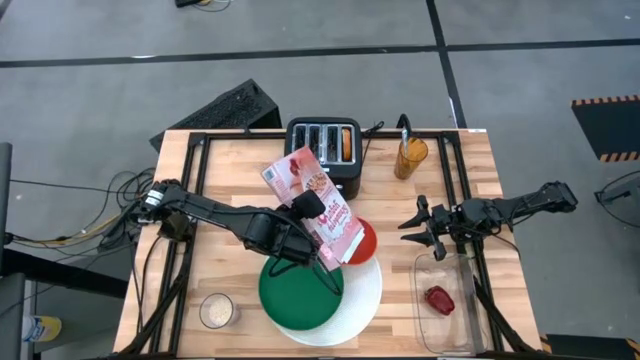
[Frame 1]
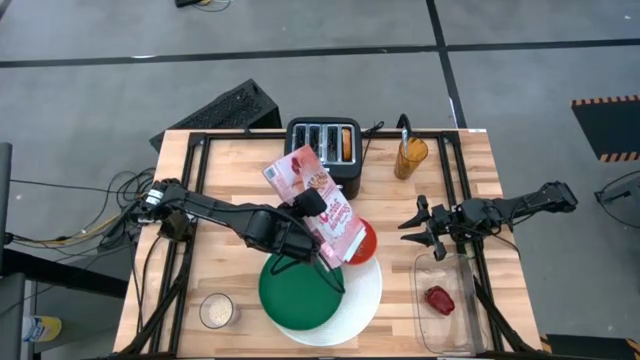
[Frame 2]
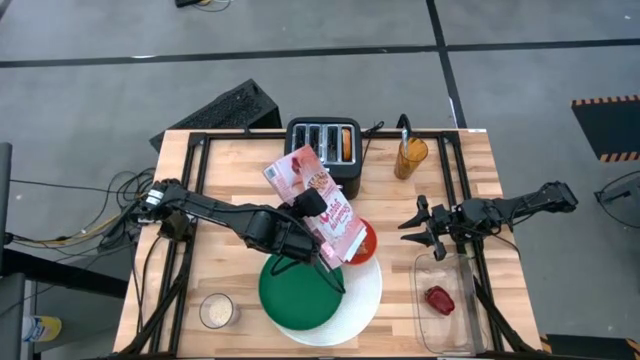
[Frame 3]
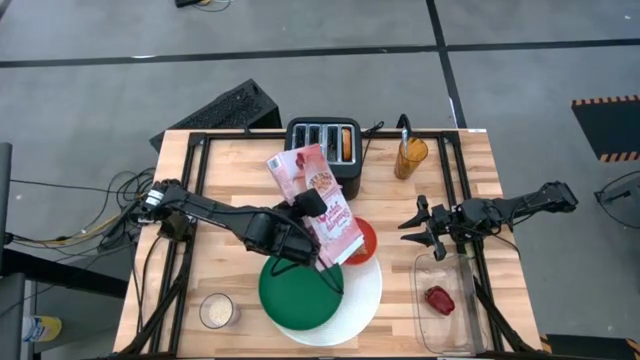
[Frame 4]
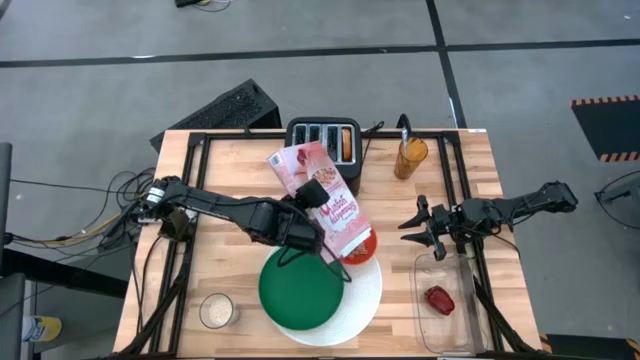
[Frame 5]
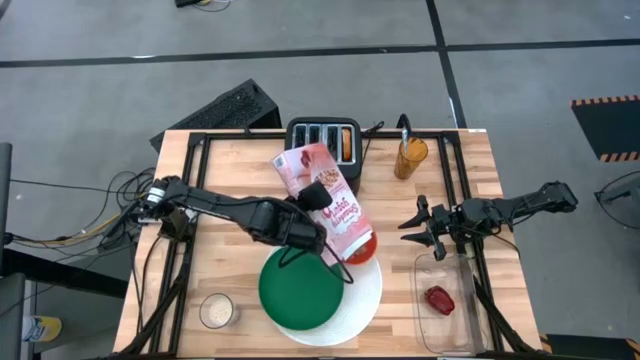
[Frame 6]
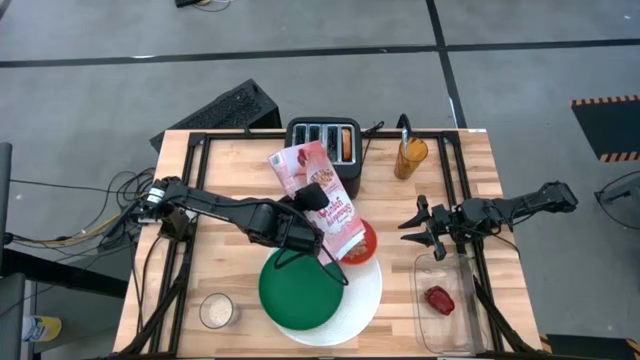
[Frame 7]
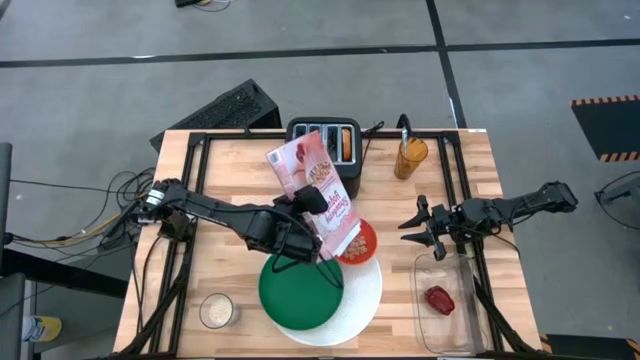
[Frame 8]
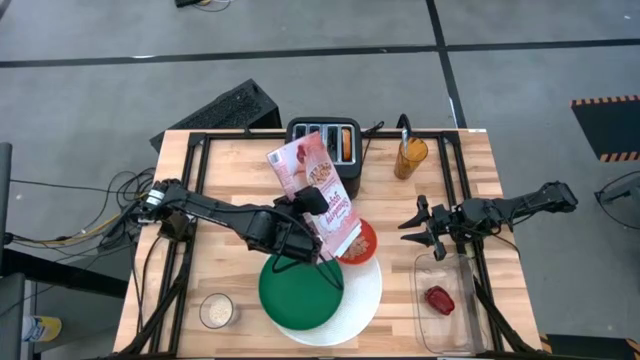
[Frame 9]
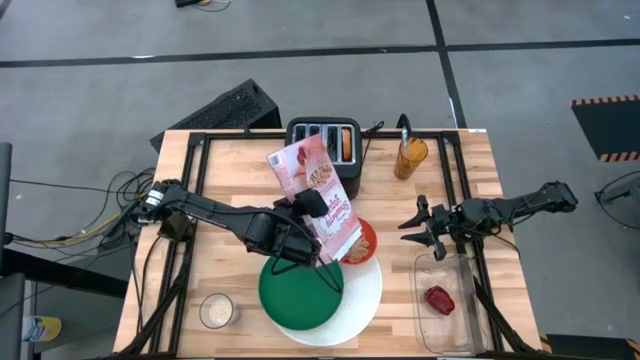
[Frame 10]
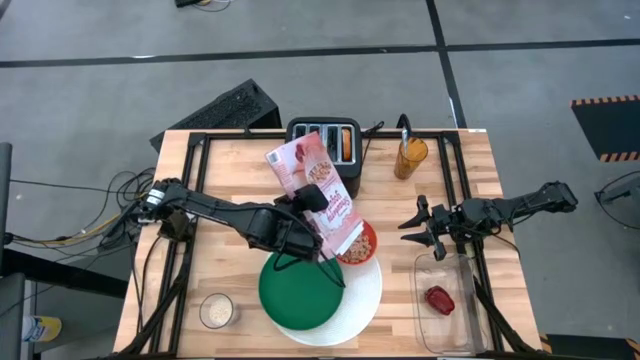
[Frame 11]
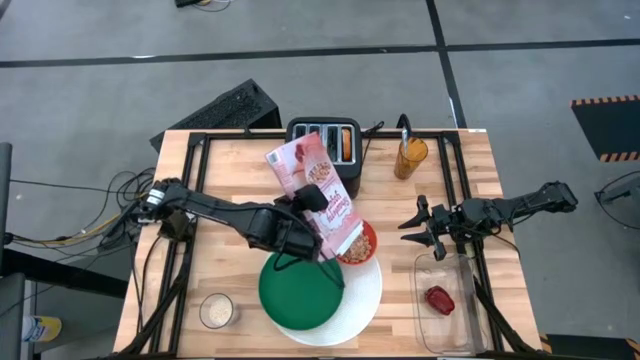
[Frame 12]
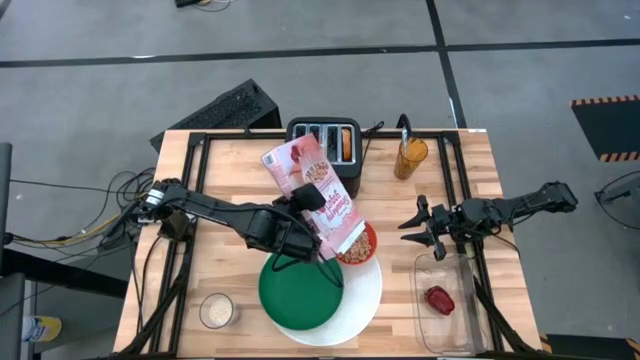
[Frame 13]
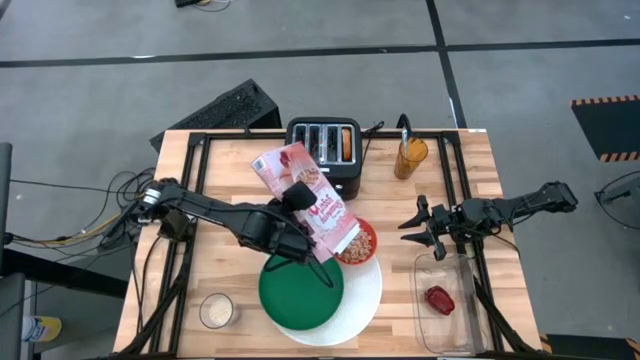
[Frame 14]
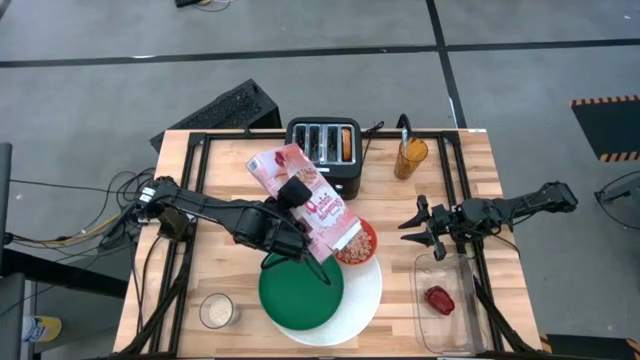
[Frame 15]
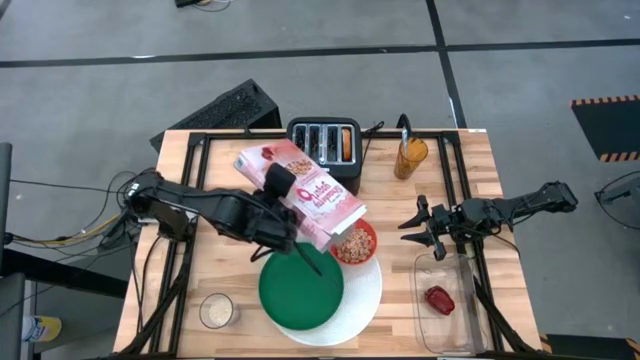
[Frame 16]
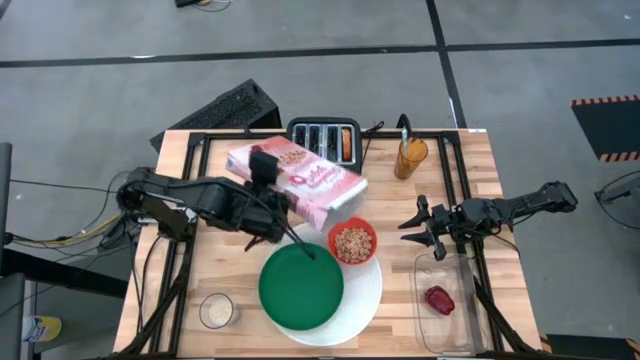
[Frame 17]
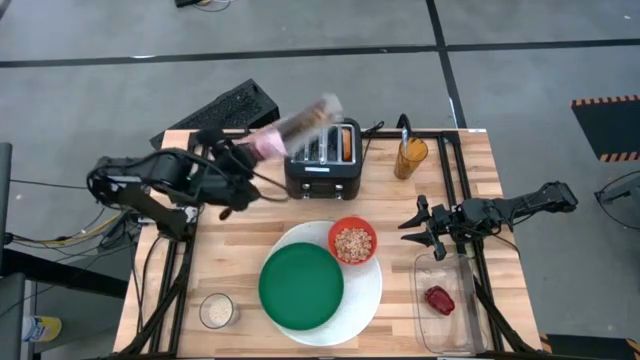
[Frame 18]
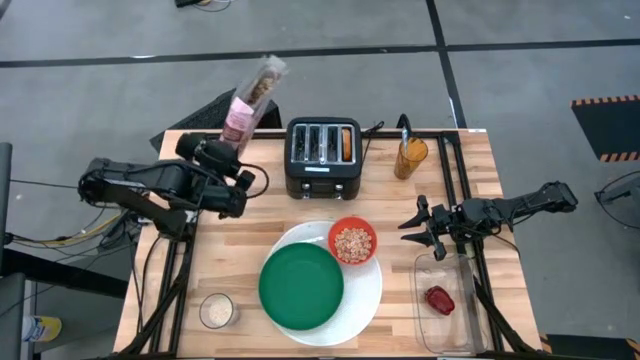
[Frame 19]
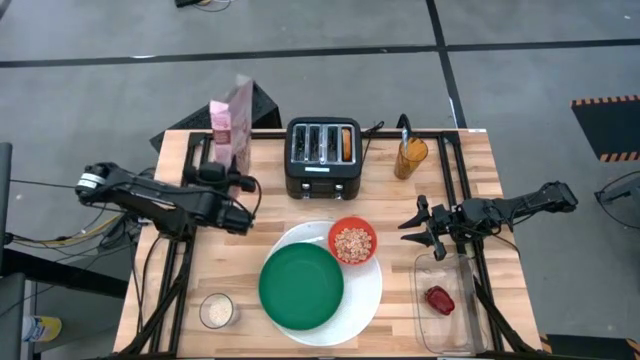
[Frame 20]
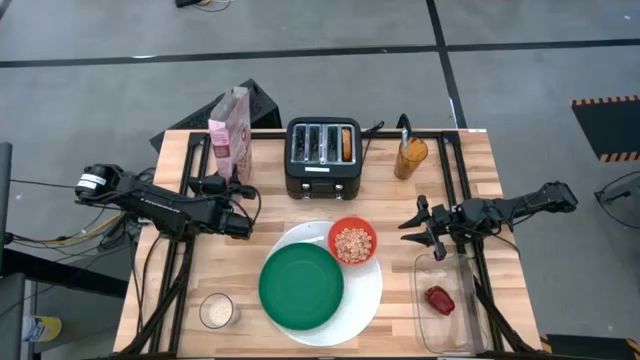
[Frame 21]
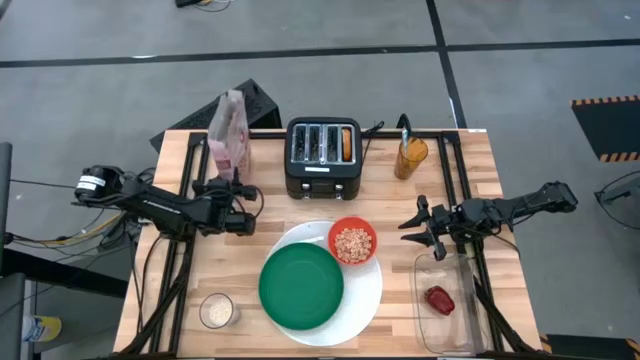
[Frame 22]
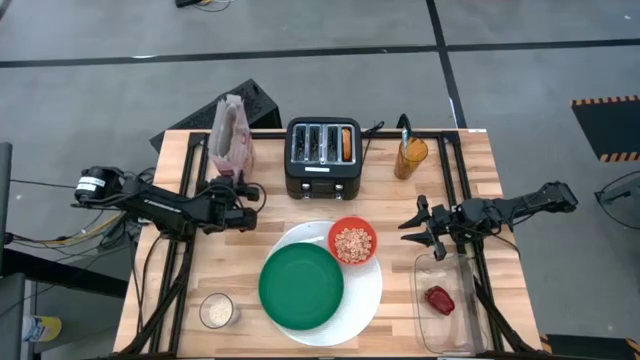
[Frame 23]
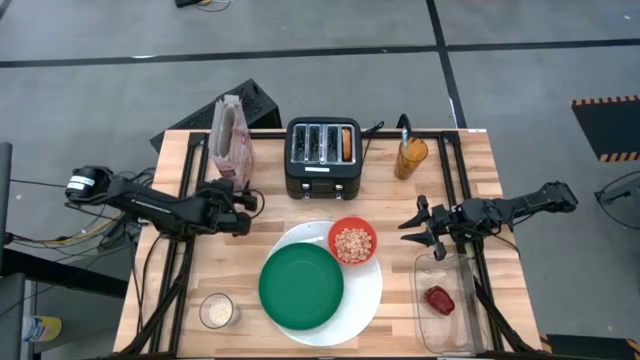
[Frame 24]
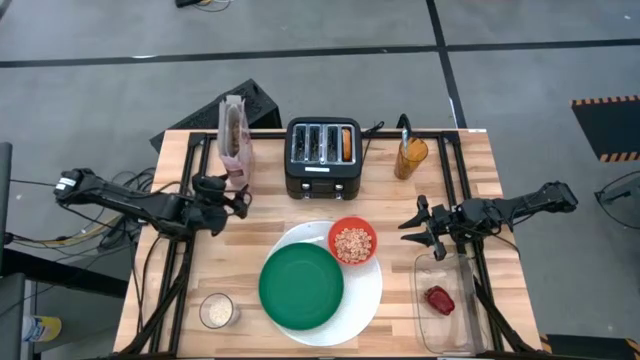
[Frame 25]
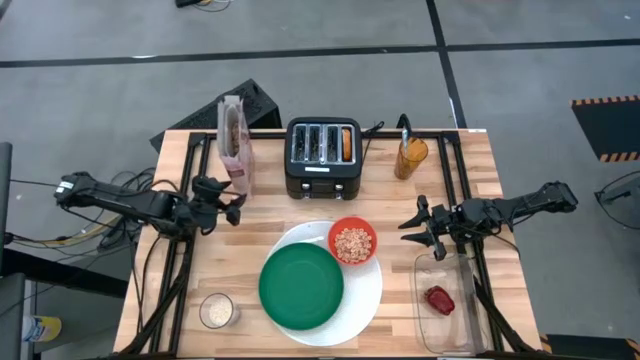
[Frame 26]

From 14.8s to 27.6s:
Task: Arrange a breakfast setting
Pour the cereal from the cereal box into the orange bowl

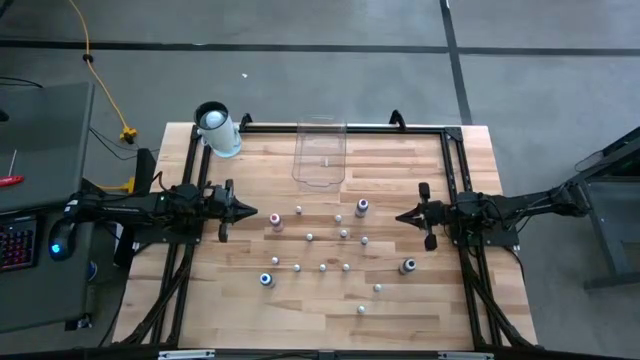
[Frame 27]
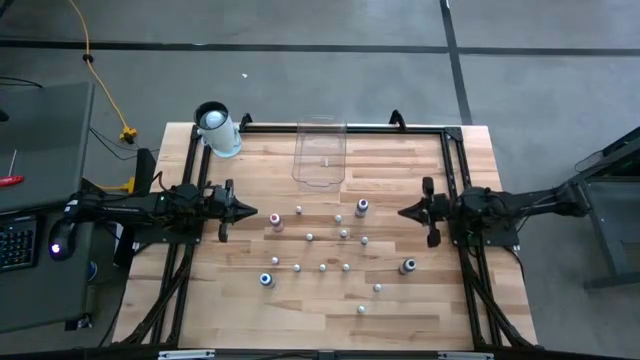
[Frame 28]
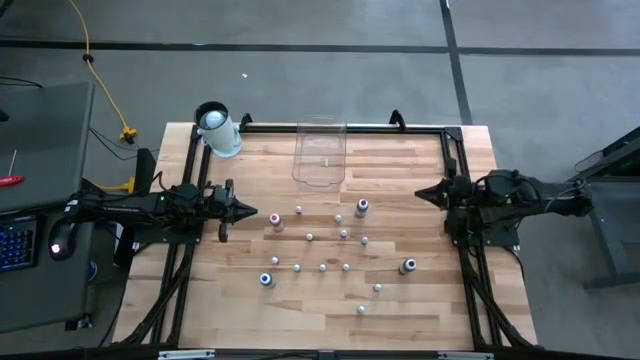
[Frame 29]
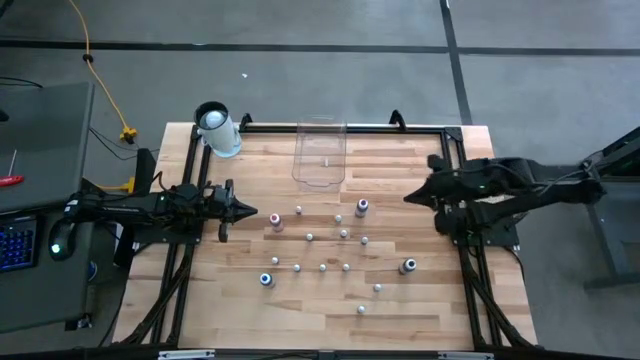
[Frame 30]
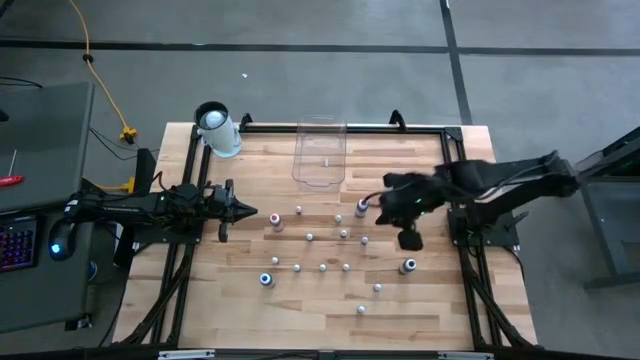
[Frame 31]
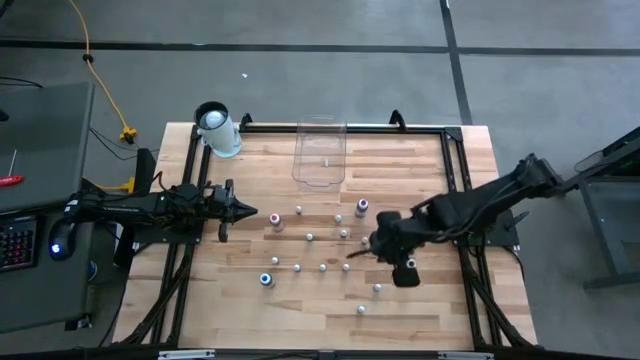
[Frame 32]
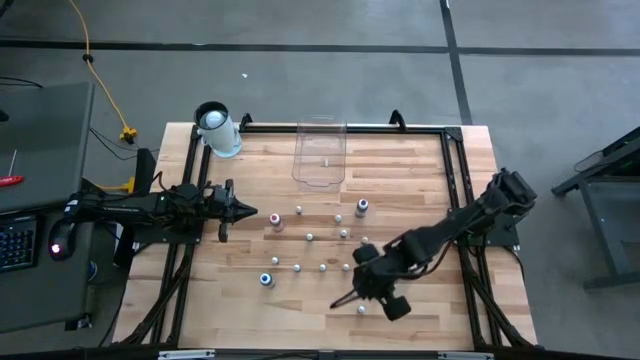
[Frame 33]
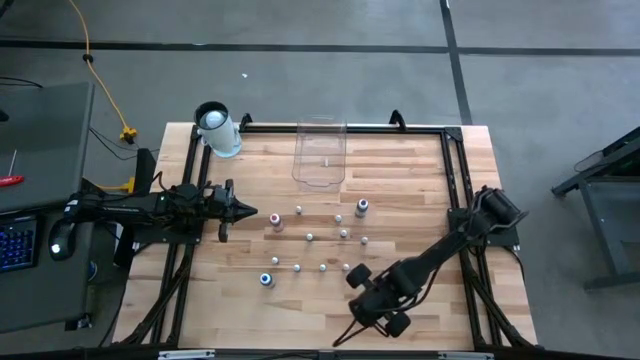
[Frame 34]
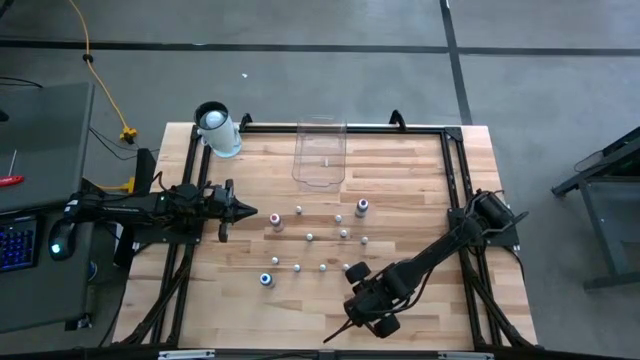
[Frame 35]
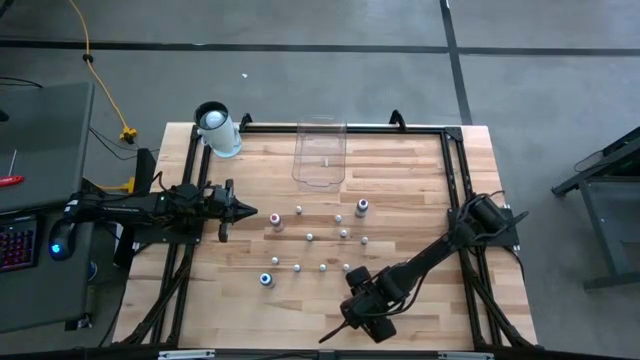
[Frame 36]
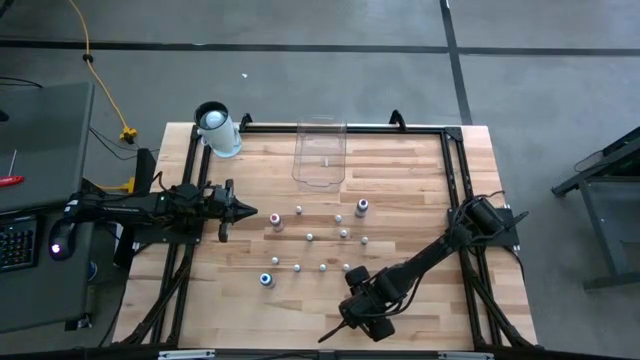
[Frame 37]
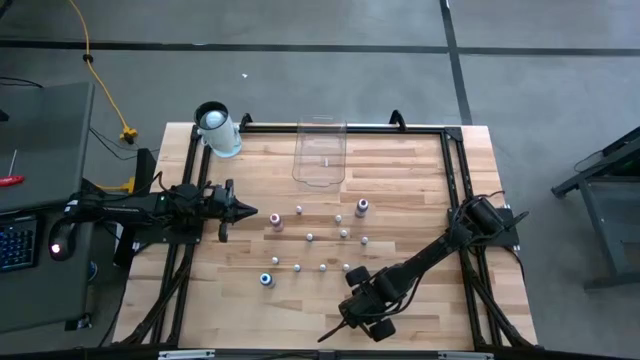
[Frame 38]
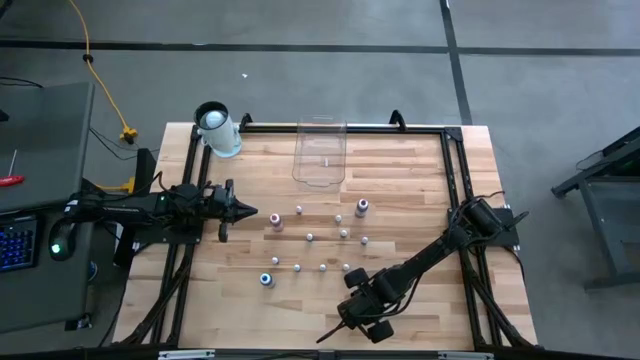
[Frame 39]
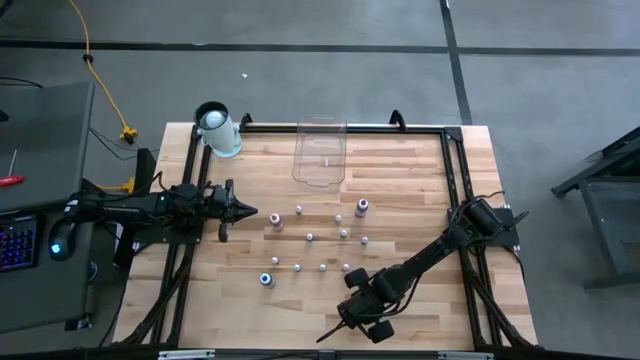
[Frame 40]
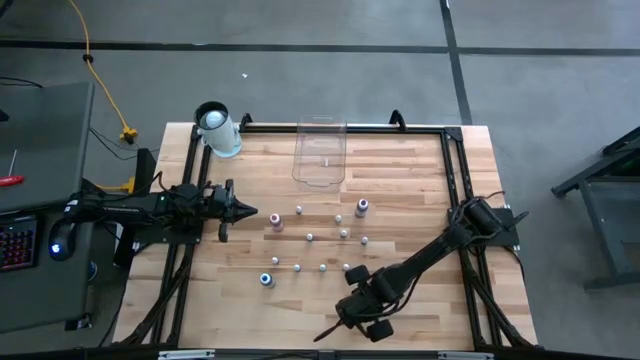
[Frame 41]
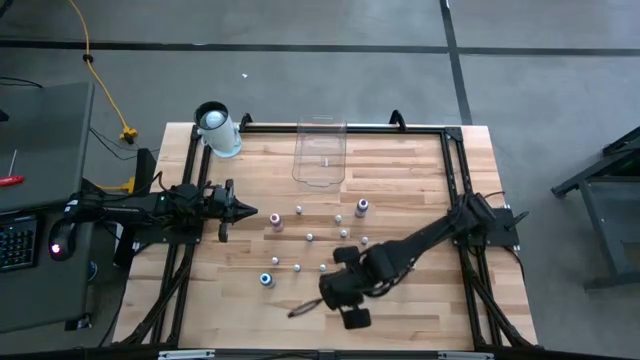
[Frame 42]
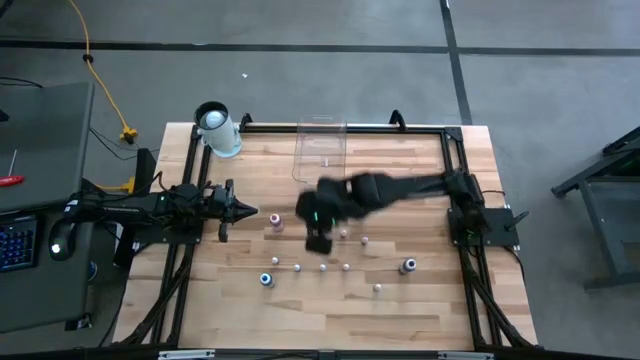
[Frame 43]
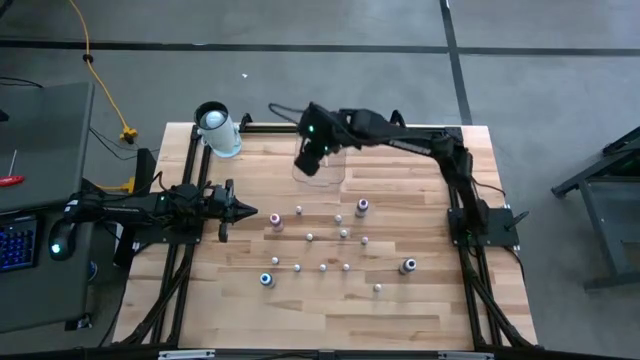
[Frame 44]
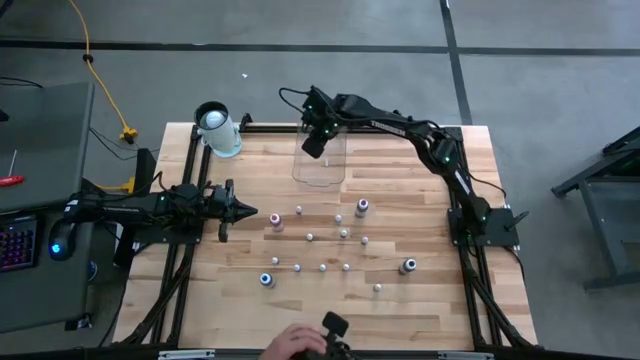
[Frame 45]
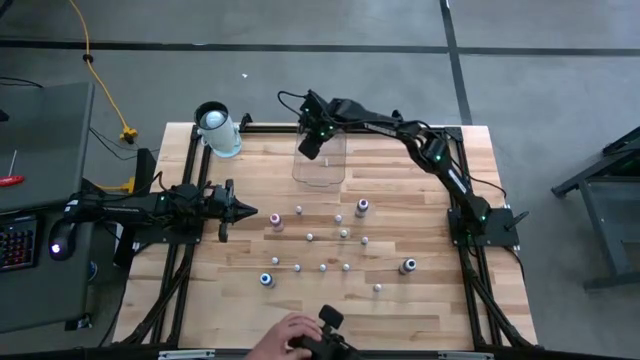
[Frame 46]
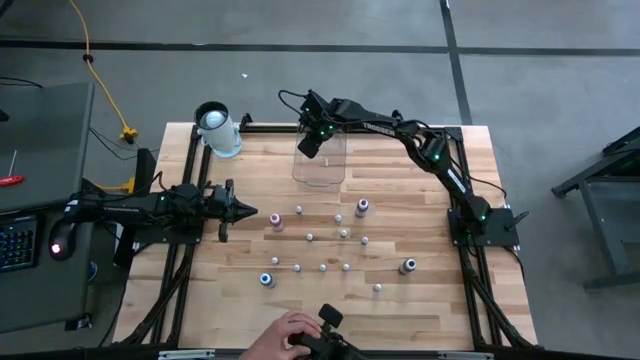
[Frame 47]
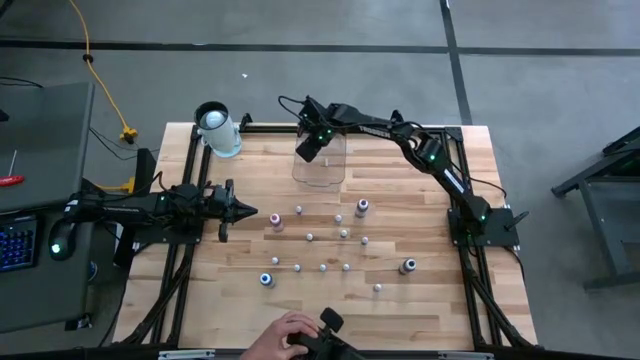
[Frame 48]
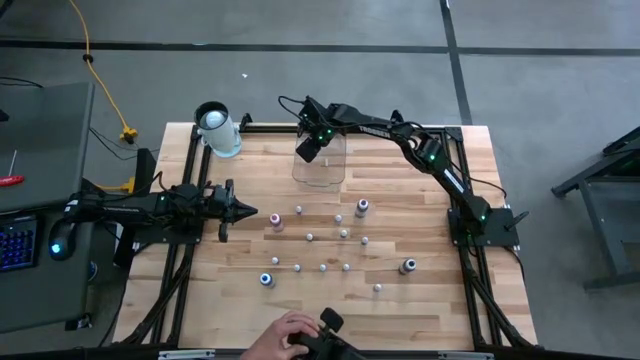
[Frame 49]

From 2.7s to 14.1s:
Task: Pick & Place food coloring
Put the small black food coloring bottle into the container
